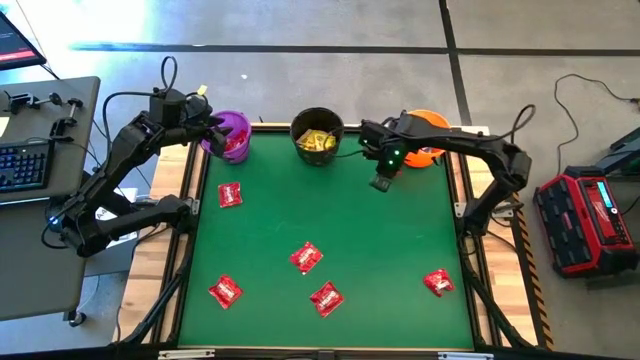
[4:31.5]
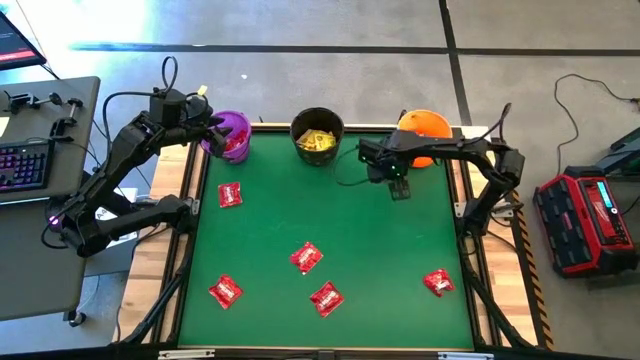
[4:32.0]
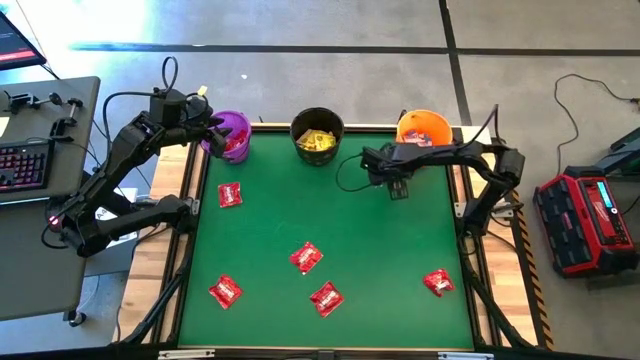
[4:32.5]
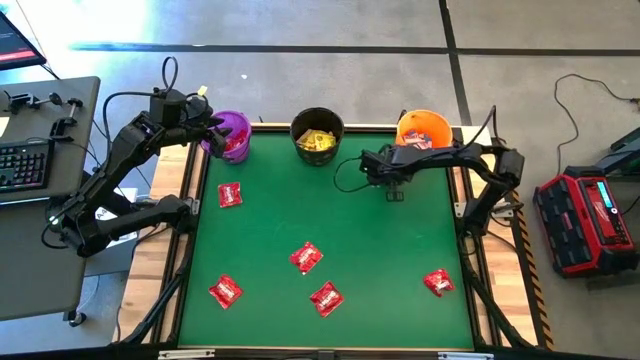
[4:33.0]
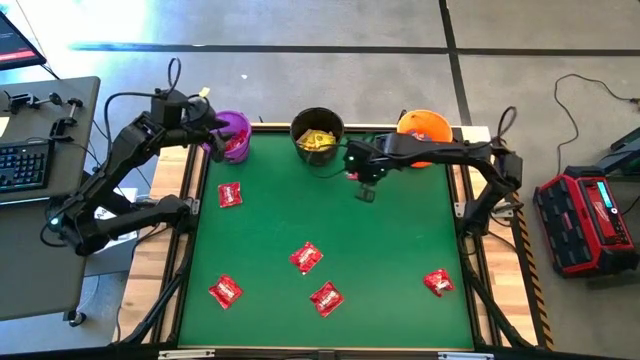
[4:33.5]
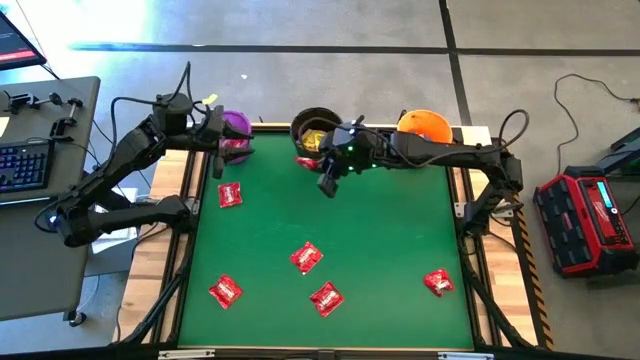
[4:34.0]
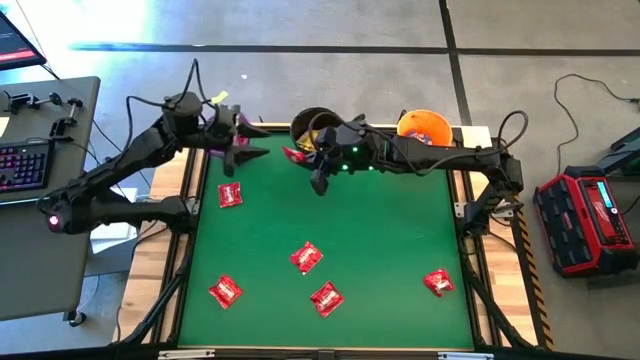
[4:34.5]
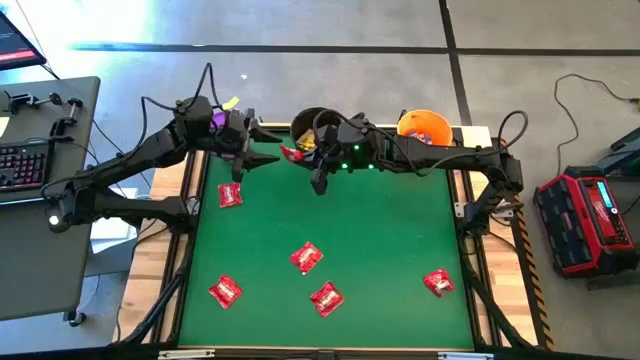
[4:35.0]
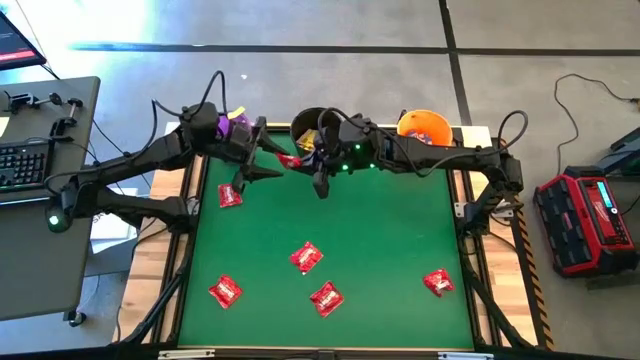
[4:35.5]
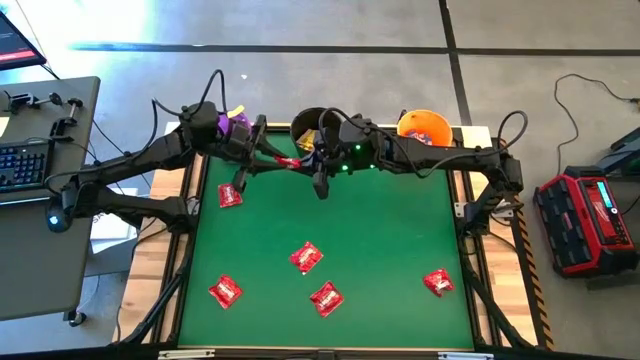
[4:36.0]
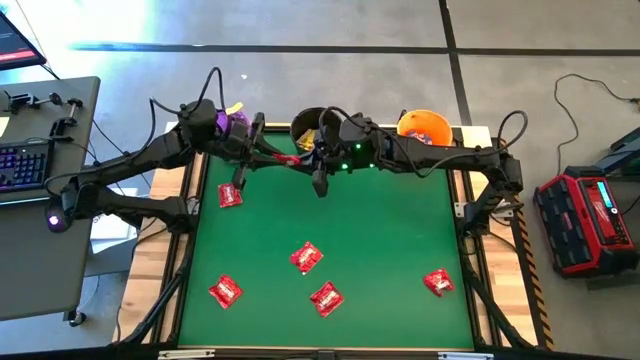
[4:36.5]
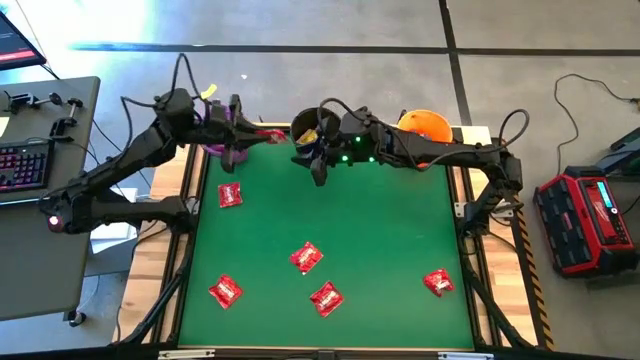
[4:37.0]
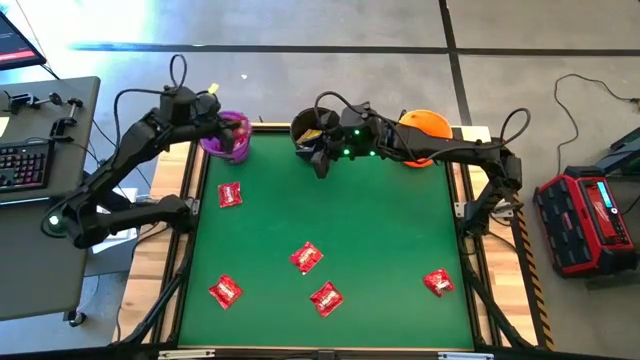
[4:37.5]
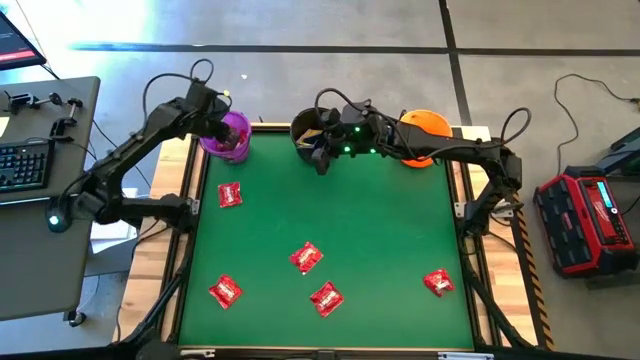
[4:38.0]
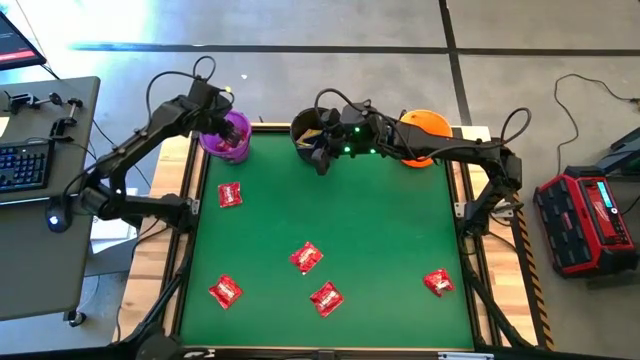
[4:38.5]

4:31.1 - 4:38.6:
Task: Sort candy by brand, put in halloween buckets
Put the red candy pack into the violet bucket

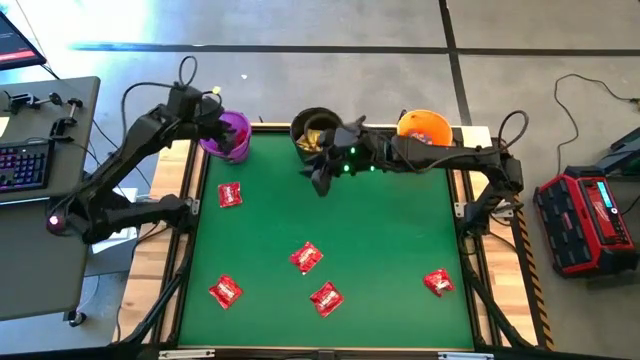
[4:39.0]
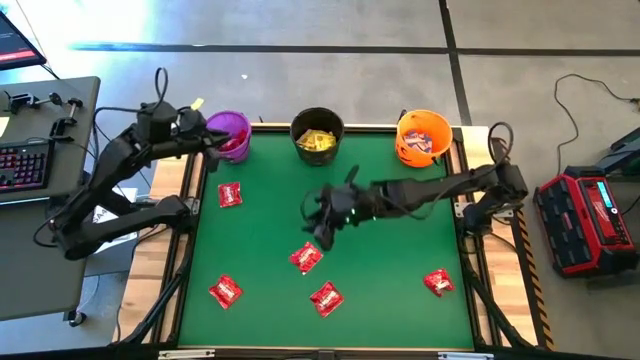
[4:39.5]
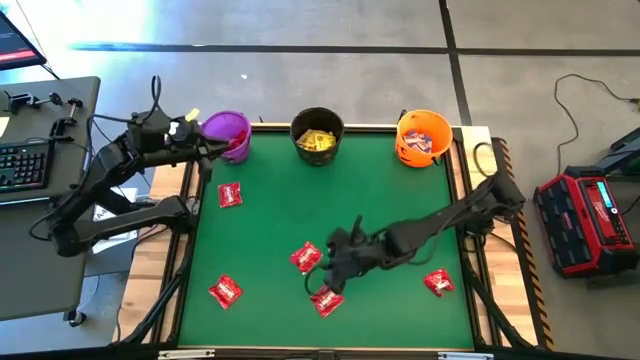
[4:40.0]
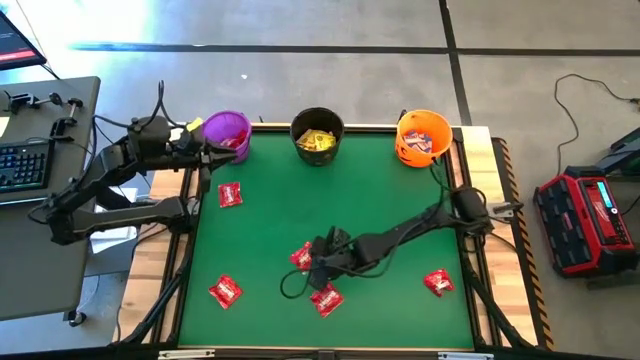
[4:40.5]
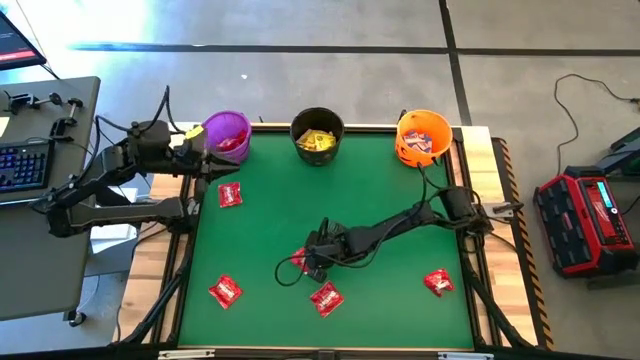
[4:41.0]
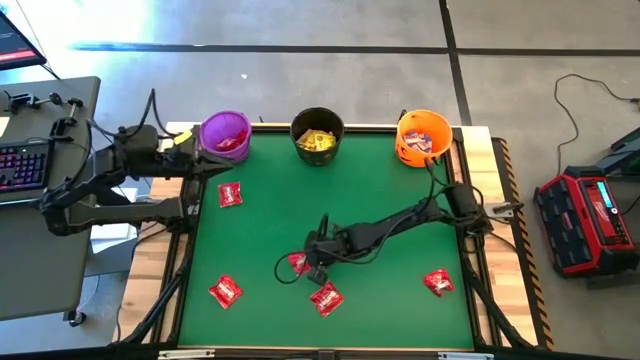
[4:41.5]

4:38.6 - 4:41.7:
Put the red candy pack into the violet bucket

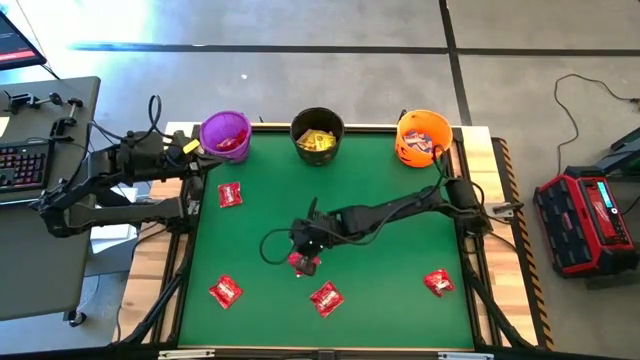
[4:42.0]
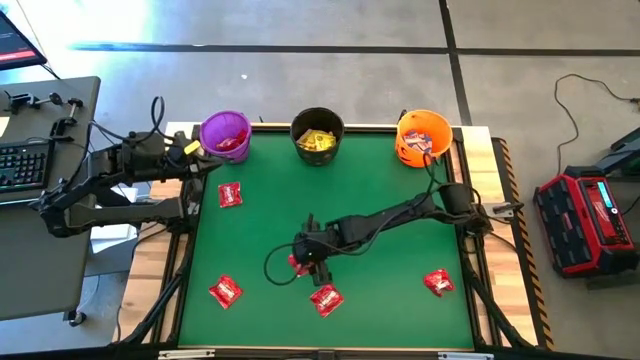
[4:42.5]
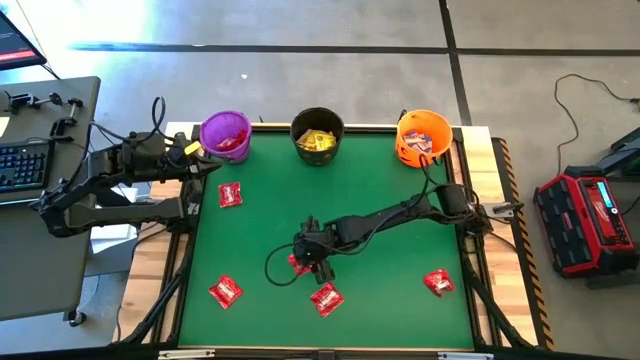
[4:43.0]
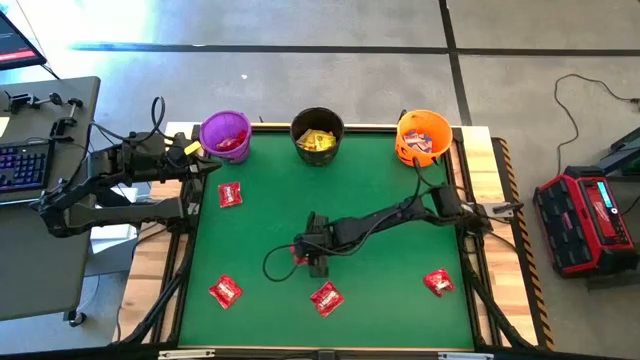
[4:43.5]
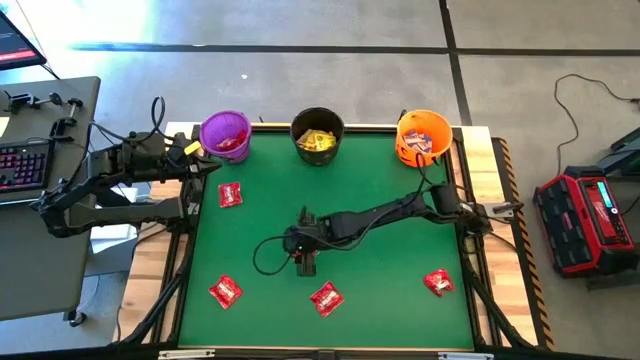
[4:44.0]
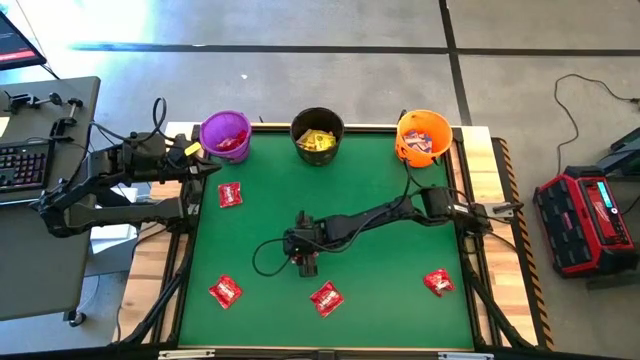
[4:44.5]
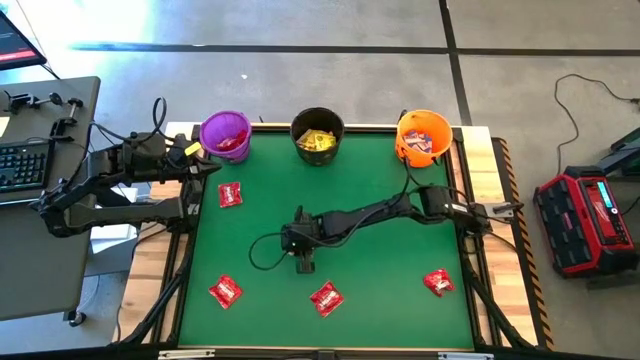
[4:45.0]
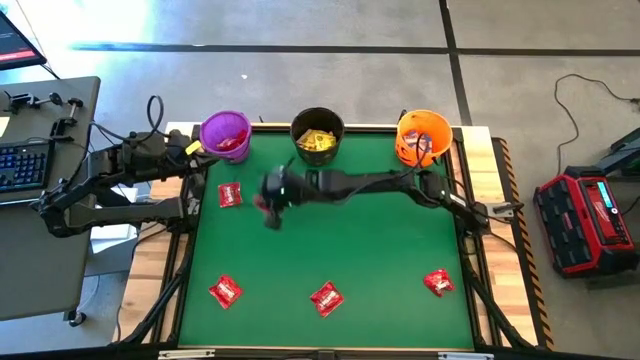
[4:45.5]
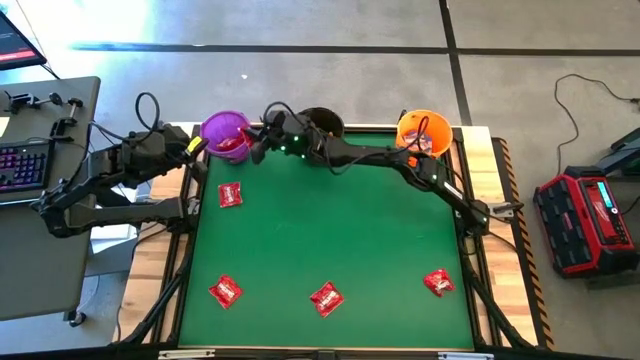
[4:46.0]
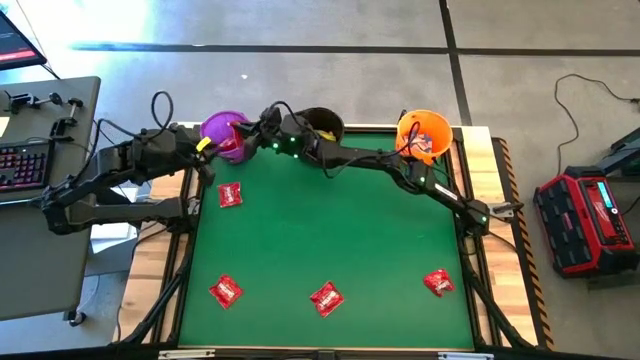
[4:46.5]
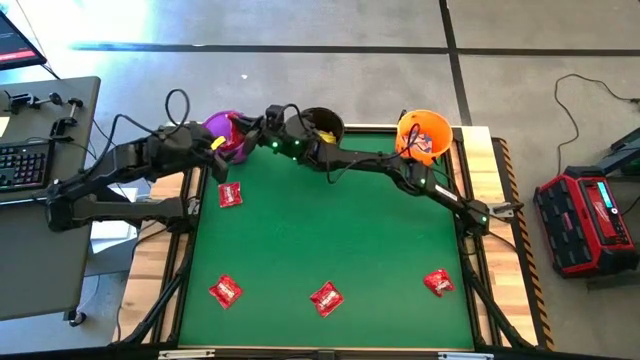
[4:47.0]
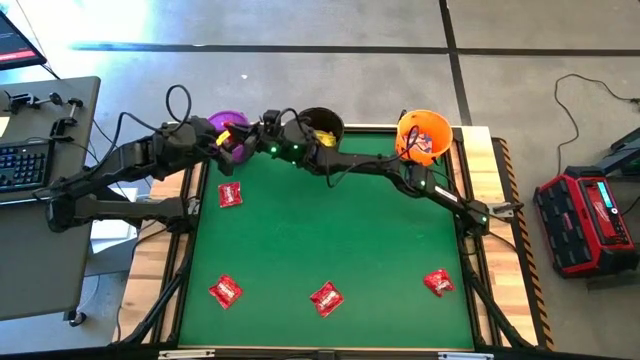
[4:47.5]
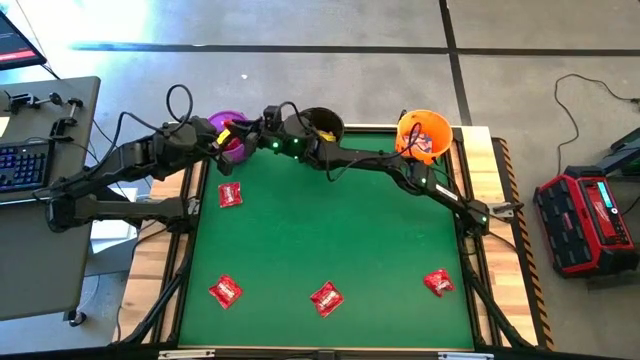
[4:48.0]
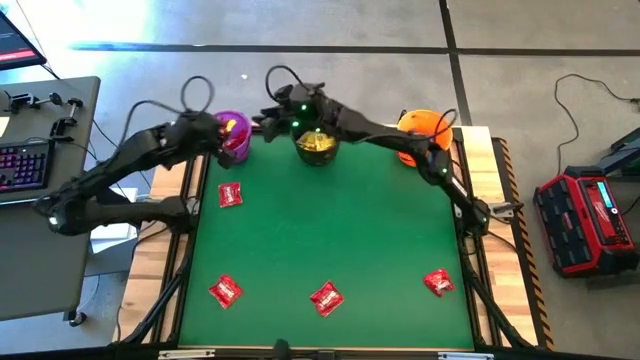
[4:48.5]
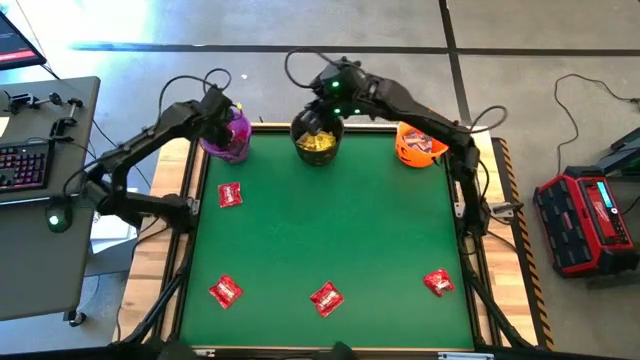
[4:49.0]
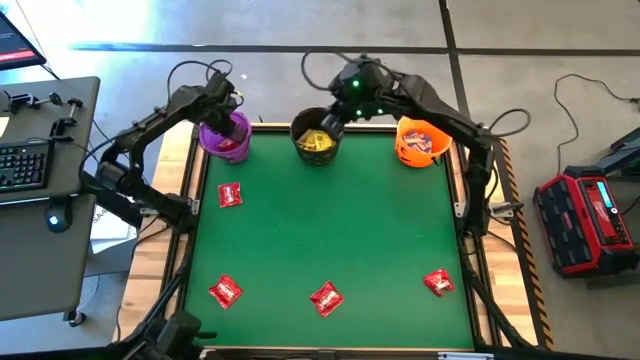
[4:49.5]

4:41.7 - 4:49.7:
Put the red candy pack into the violet bucket

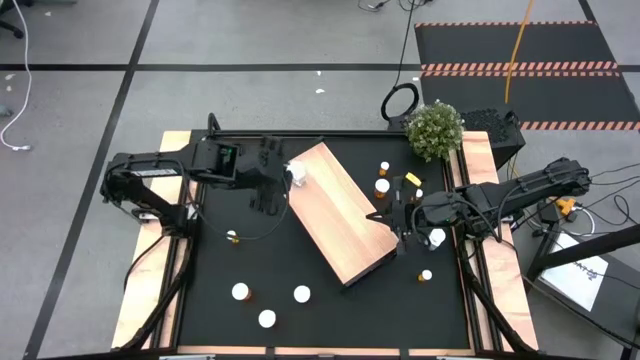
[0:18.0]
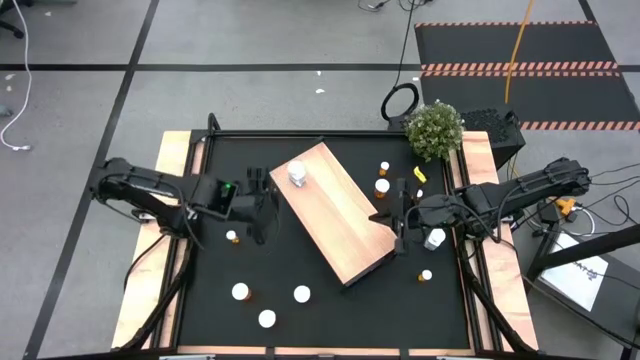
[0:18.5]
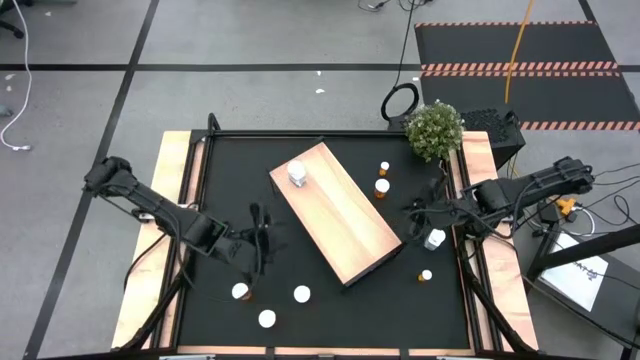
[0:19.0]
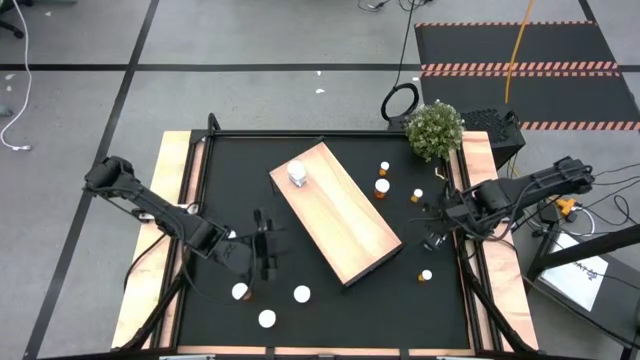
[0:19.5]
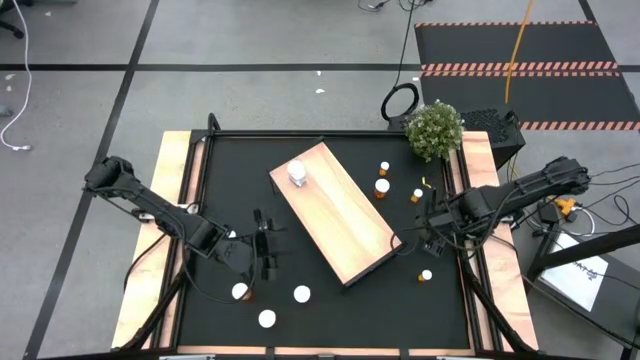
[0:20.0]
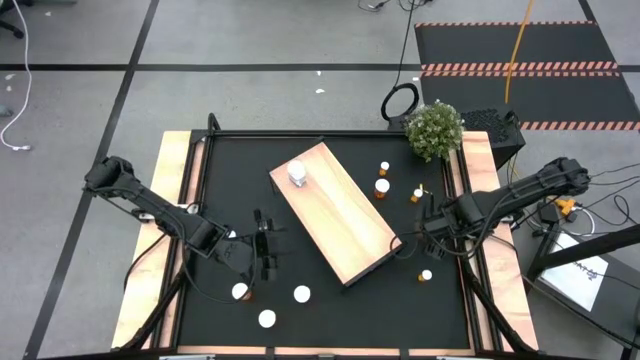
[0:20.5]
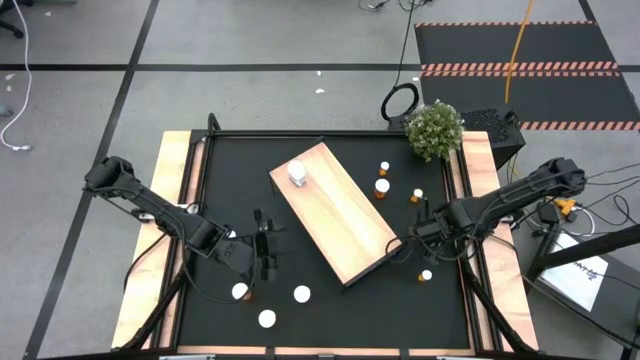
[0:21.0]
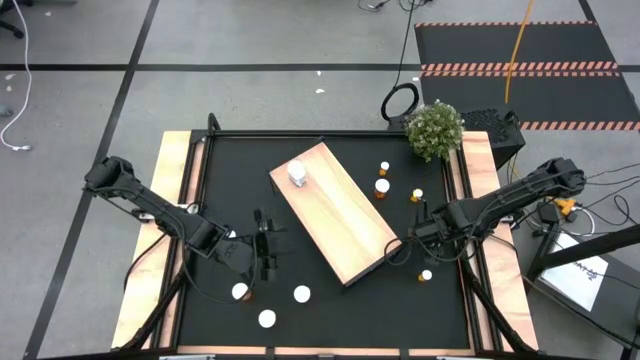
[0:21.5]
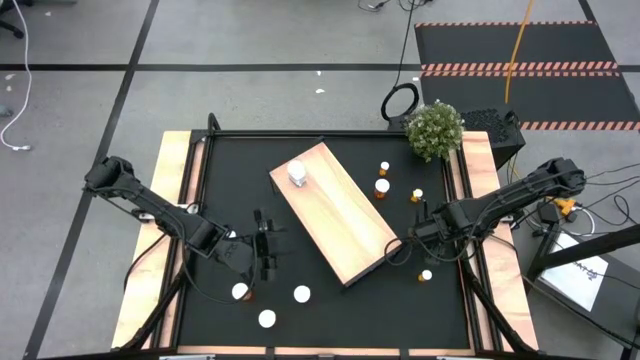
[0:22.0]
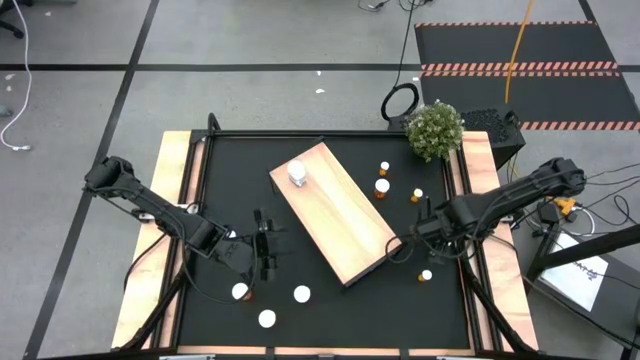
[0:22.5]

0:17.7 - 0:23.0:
Task: Pick and place medicine bottles onto shelf by color
Put the white pill bottle on the shelf aligned with the white pill bottle
